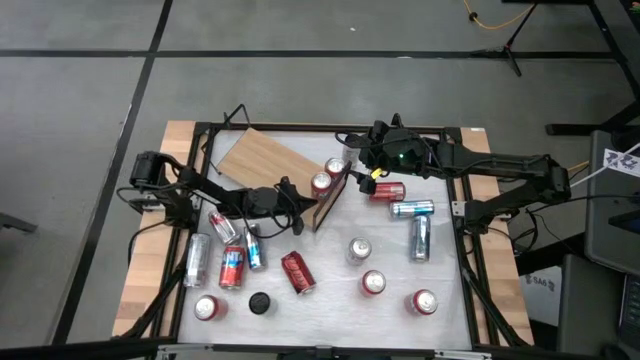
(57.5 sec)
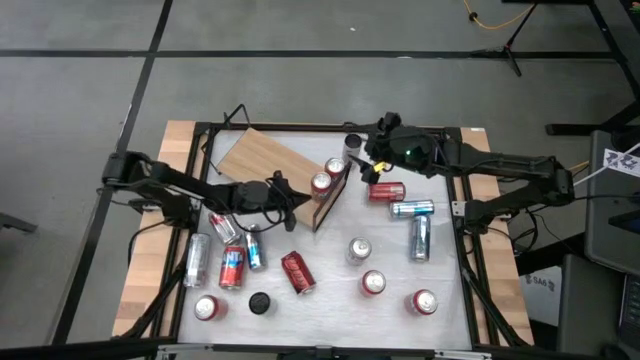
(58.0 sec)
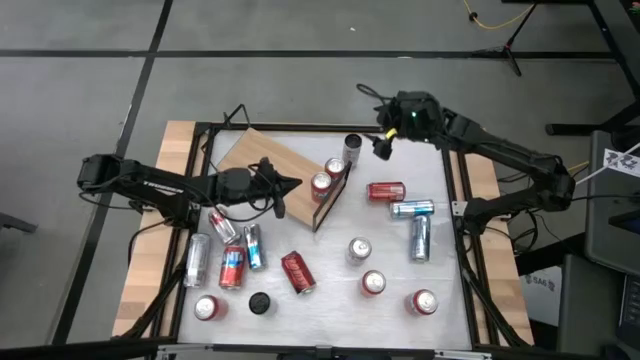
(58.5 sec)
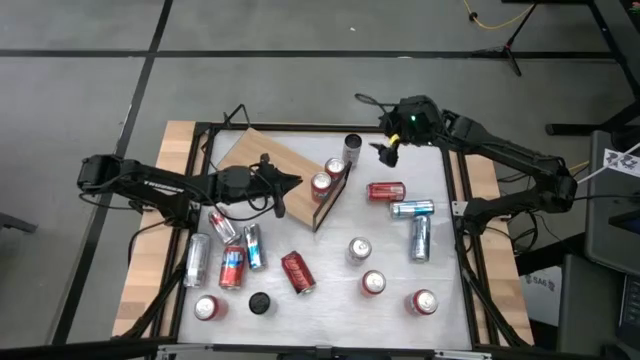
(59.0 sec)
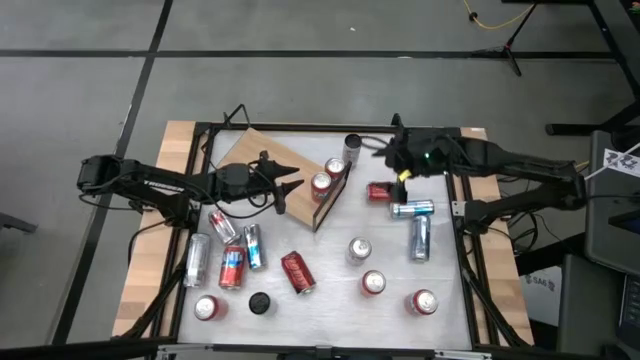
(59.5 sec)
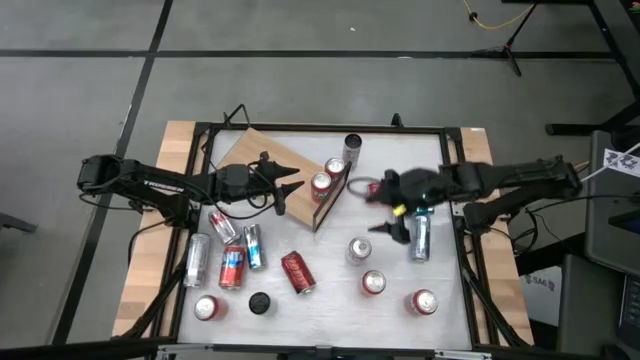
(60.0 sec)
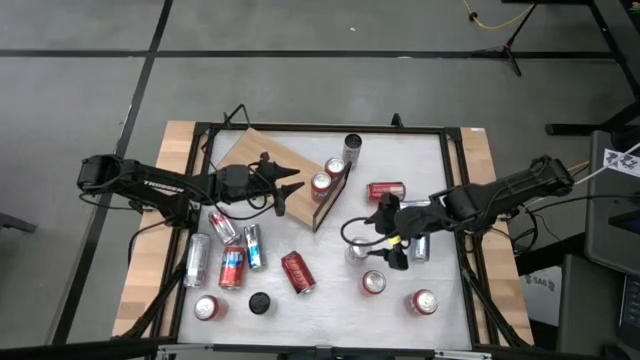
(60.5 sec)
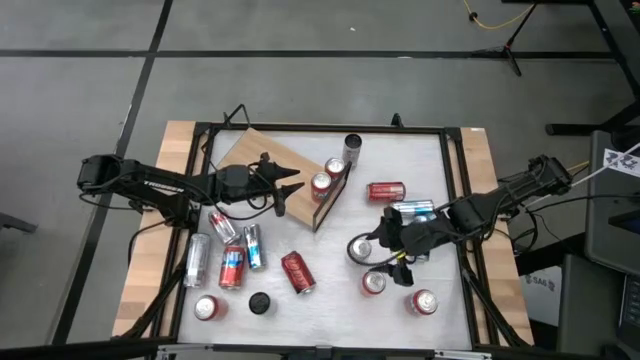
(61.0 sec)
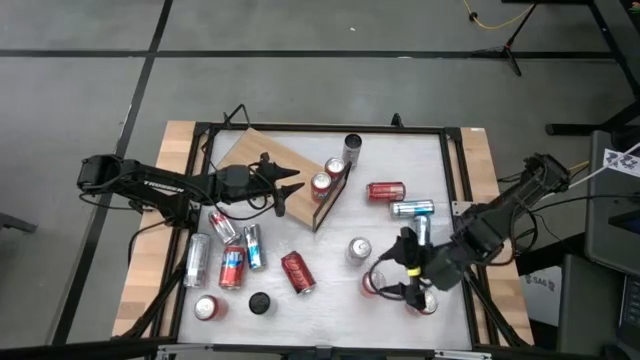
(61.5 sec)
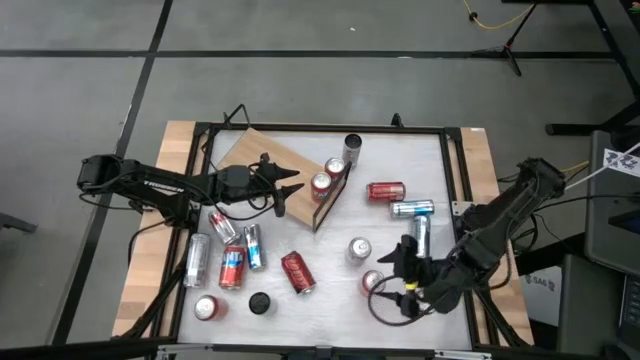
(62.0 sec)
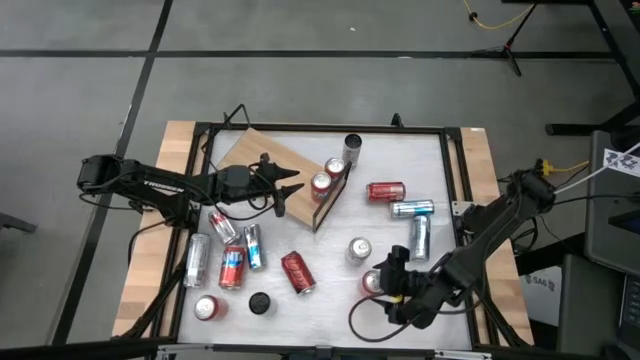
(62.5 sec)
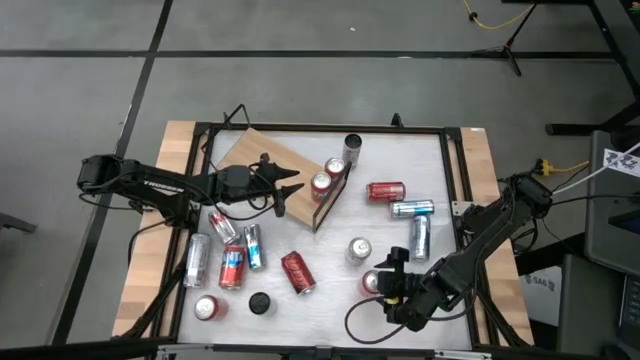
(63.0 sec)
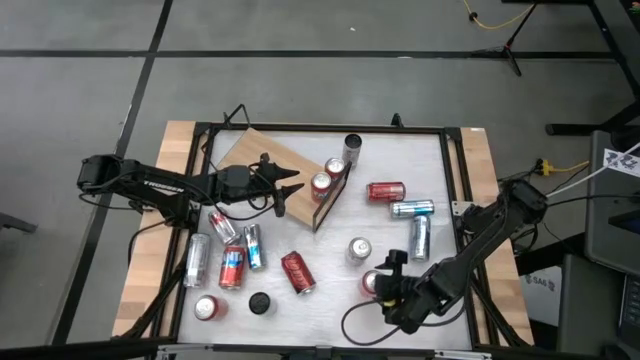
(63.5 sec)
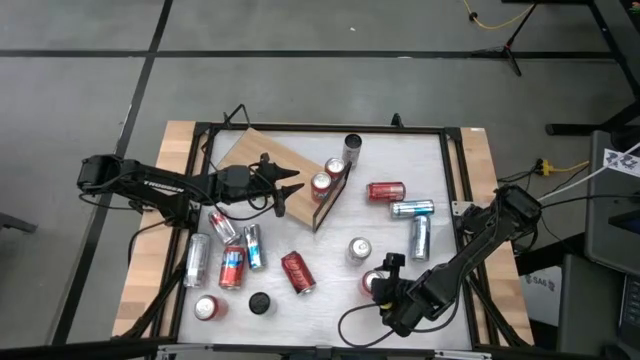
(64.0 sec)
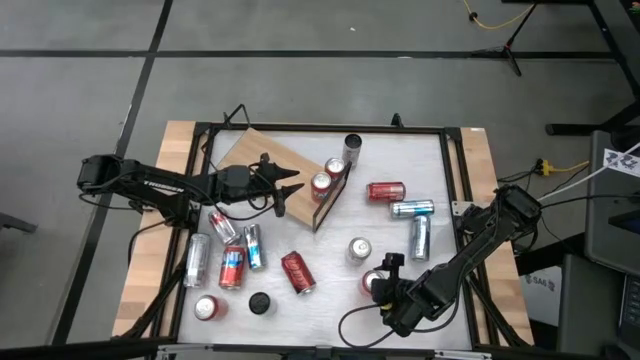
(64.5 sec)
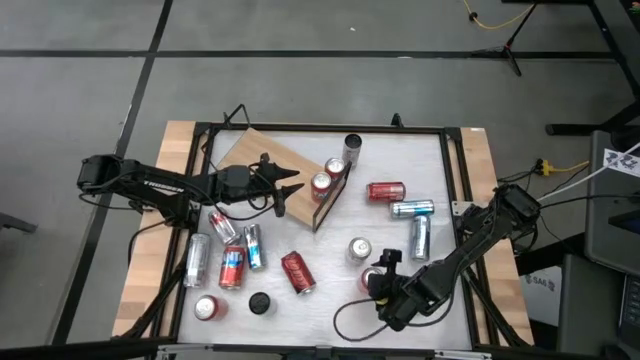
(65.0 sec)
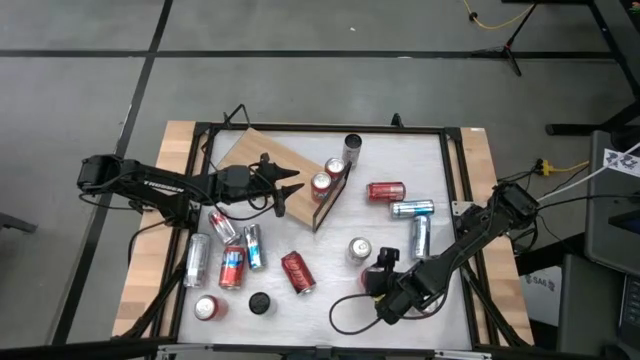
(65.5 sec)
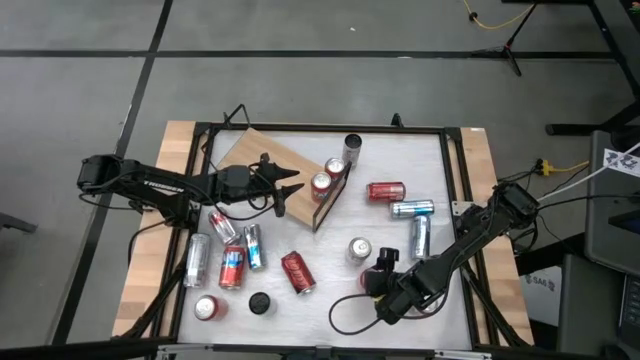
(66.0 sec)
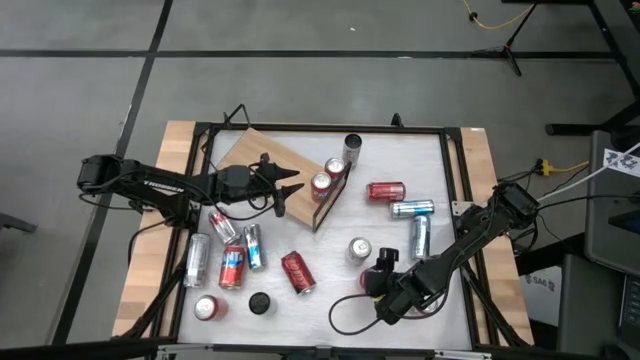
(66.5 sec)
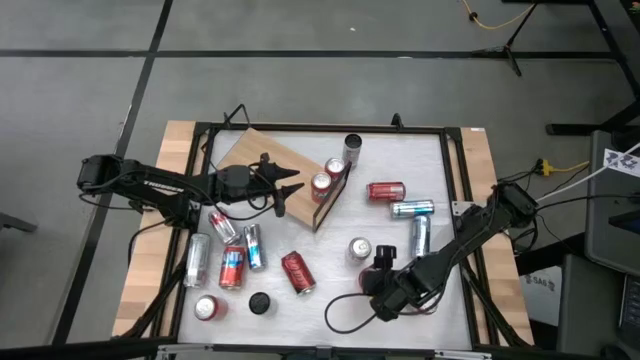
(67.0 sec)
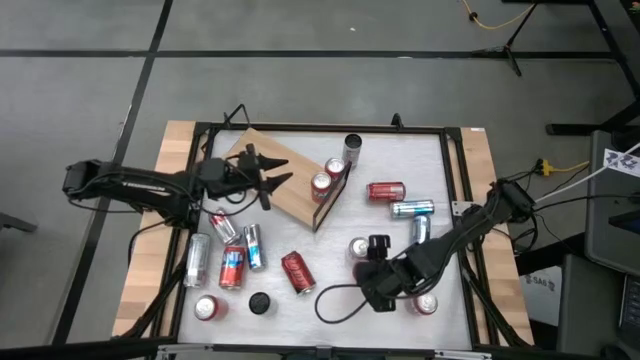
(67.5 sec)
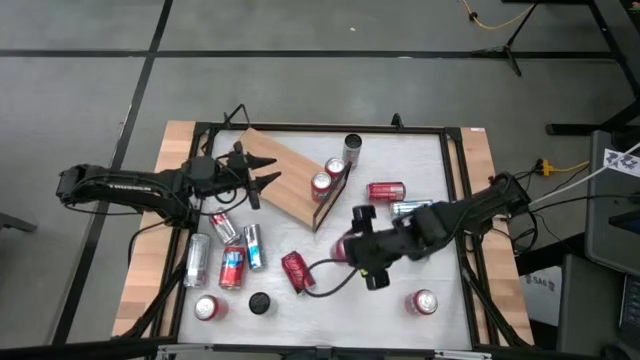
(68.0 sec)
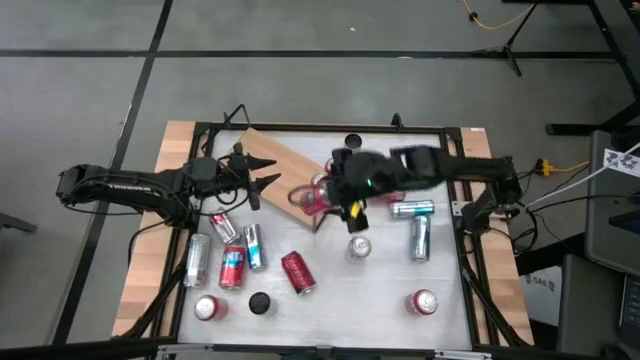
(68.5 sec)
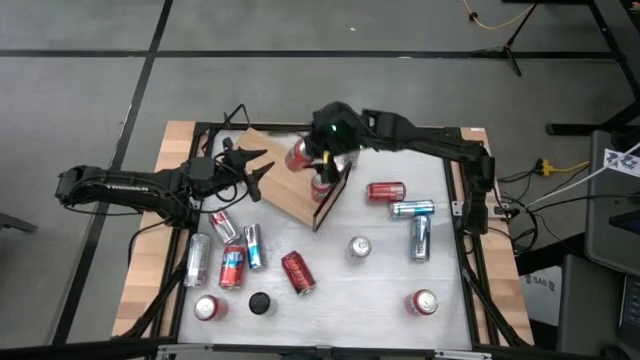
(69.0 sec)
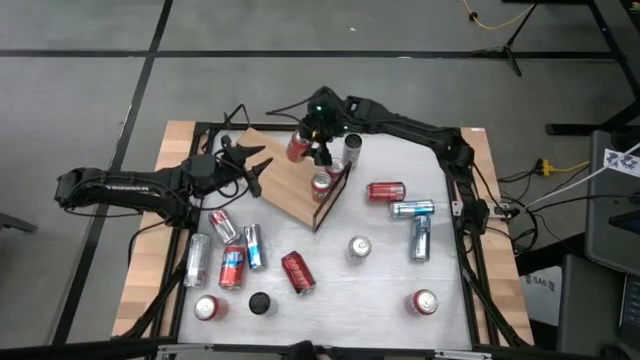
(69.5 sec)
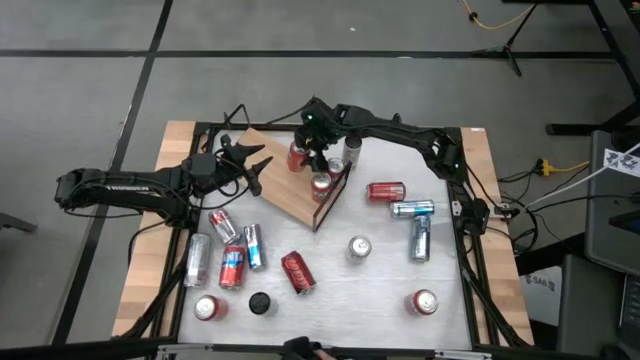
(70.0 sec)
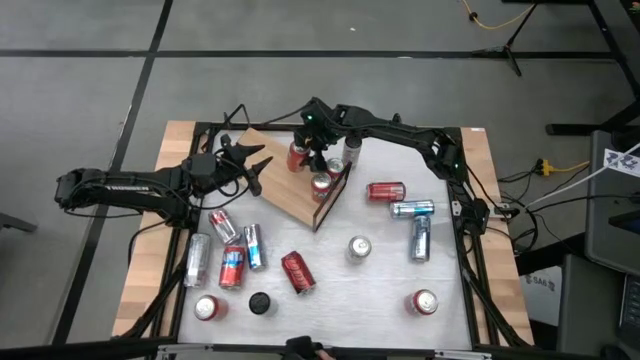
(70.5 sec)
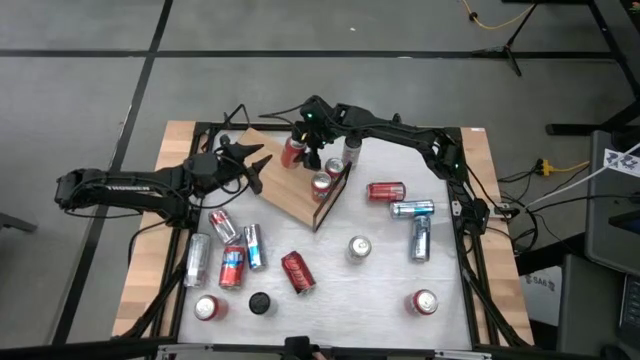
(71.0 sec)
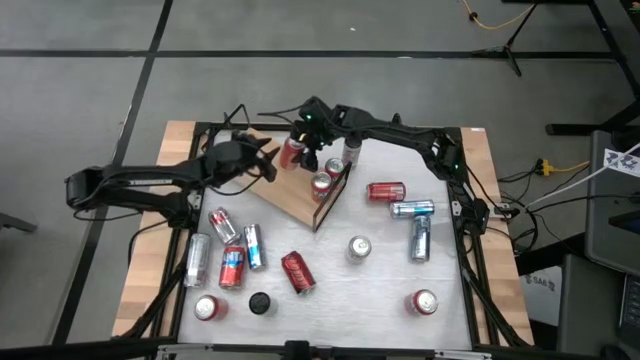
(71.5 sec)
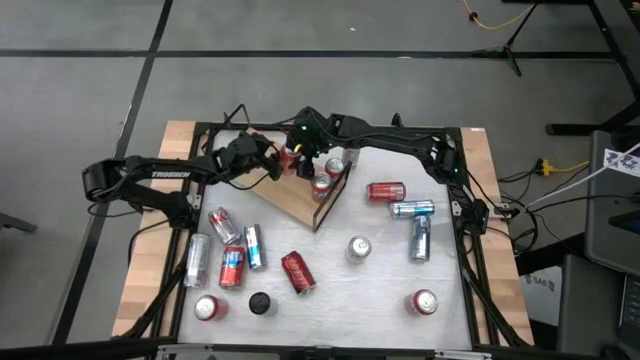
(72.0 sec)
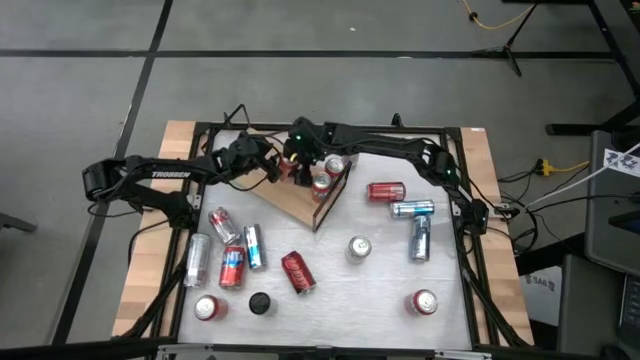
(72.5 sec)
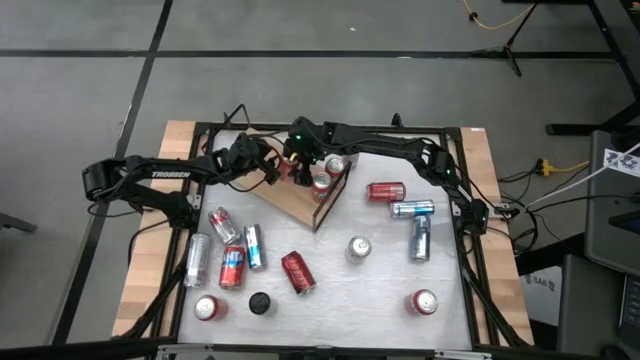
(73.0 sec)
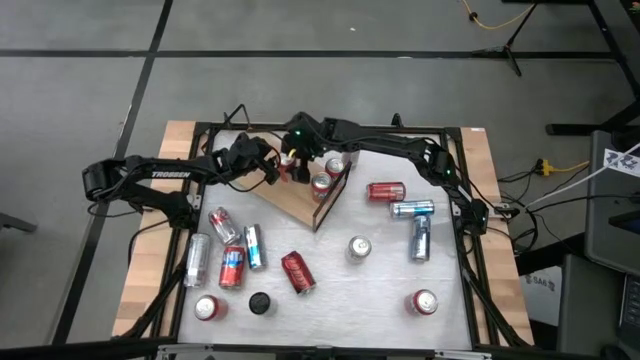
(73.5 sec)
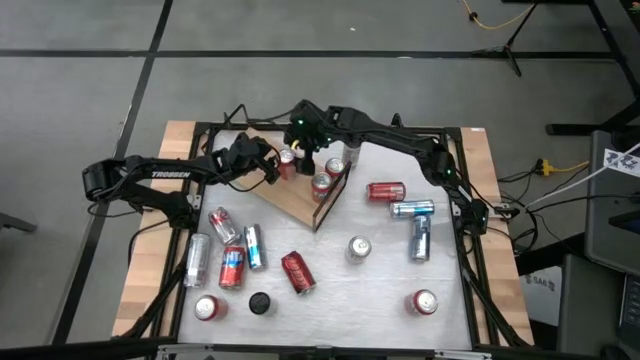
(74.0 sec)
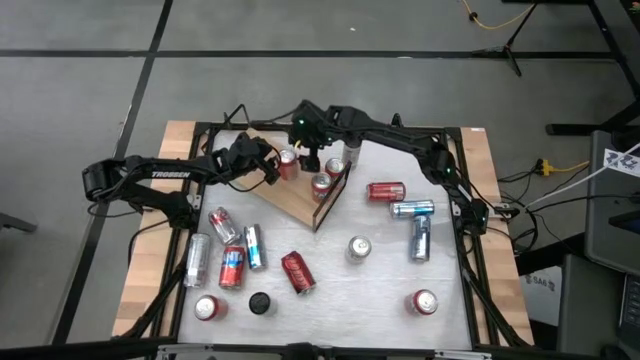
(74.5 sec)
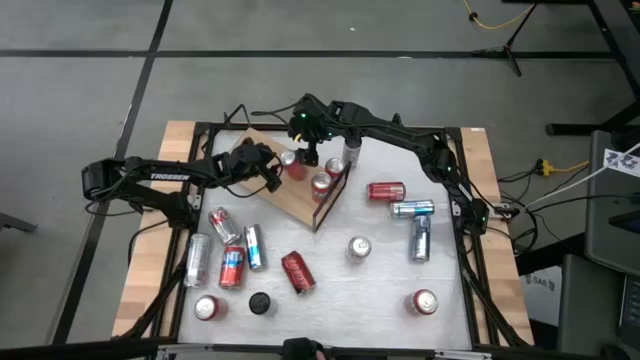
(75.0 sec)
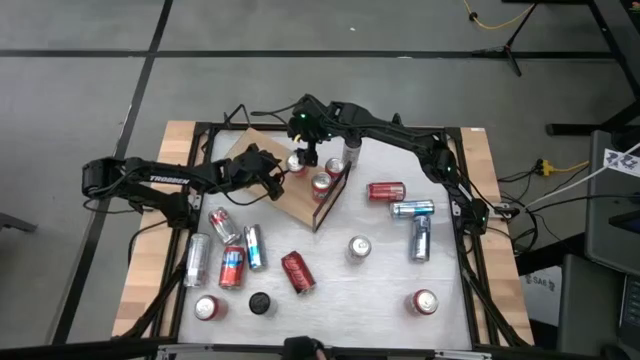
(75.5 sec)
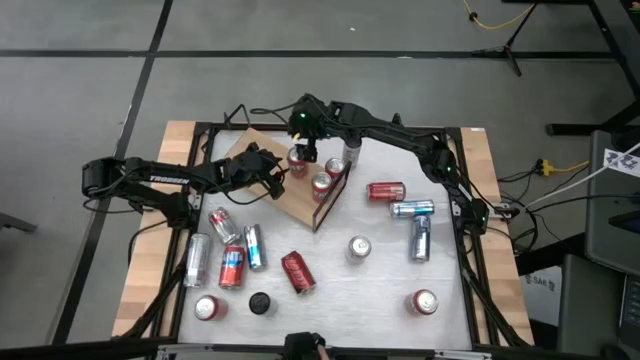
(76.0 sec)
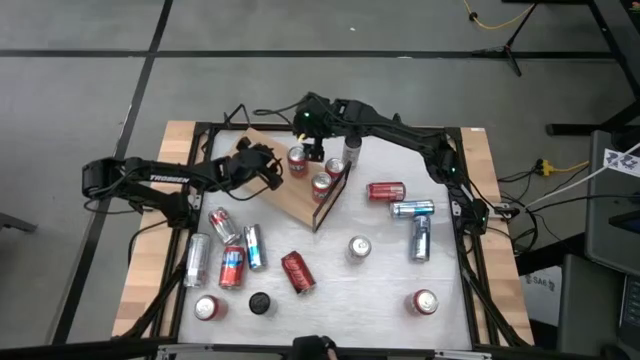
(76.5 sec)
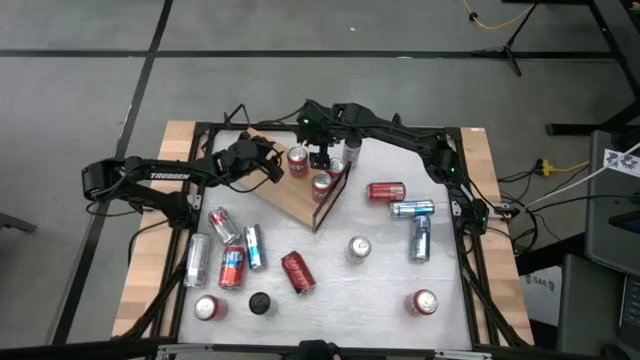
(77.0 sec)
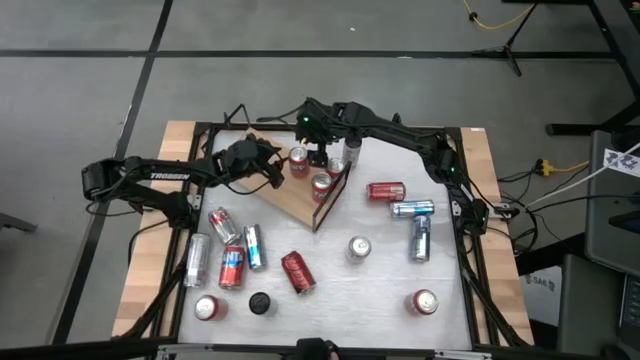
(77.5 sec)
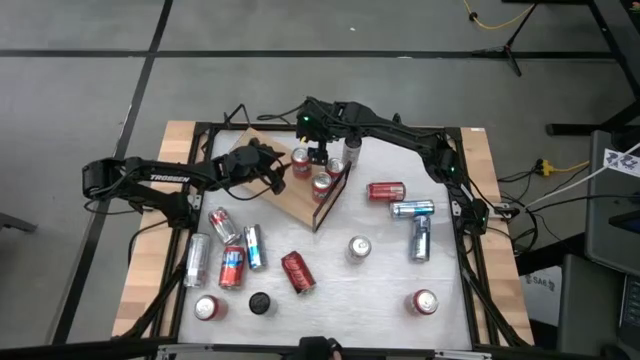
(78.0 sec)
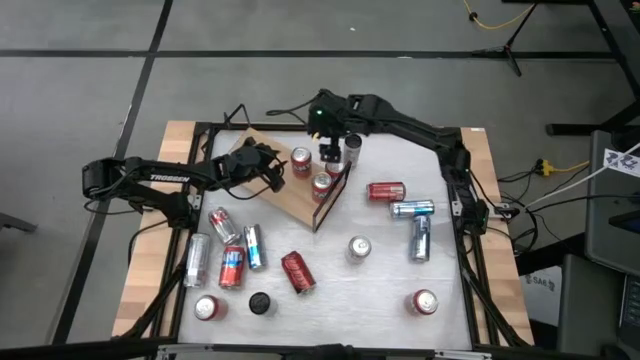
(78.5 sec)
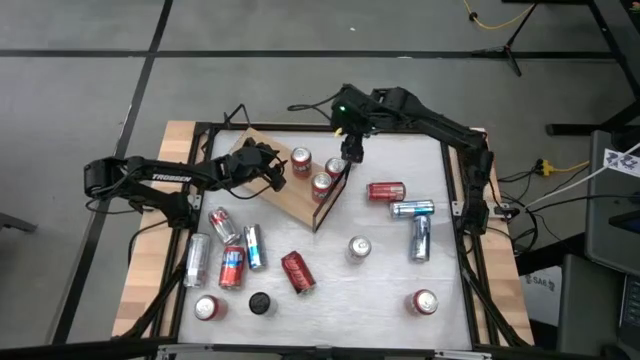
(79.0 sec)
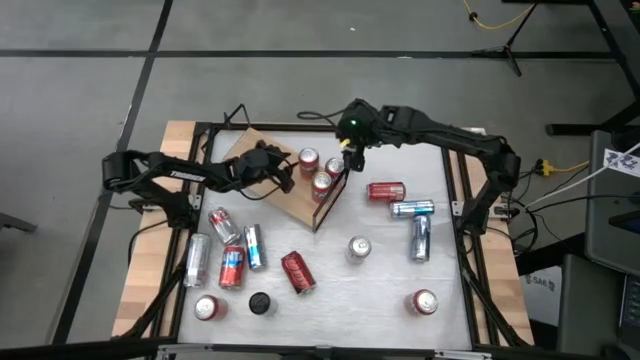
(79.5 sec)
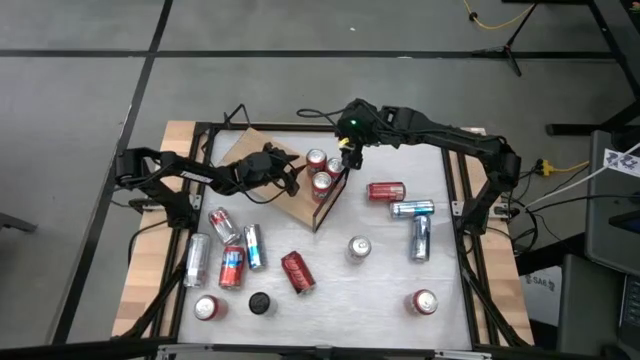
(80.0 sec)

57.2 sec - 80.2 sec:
Task: Pick and place cans onto a shelf
Put the center red soda can on the shelf
